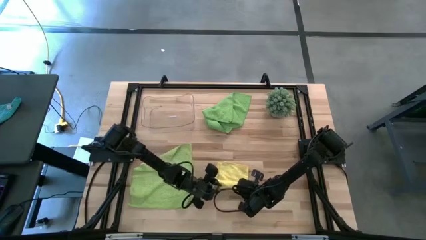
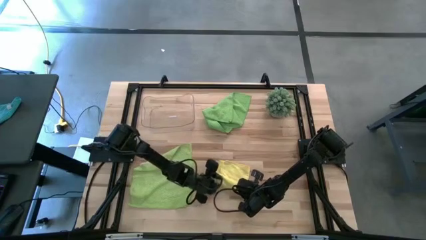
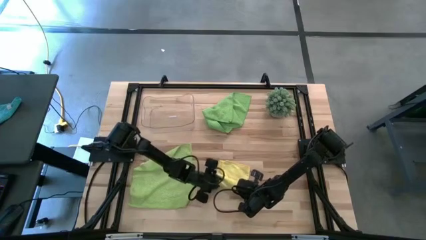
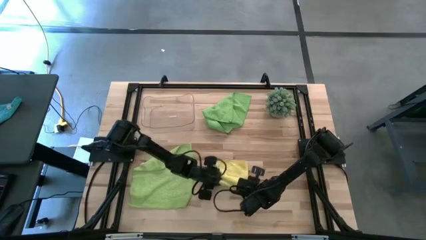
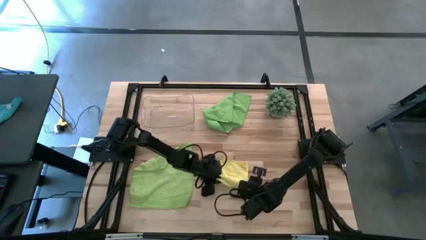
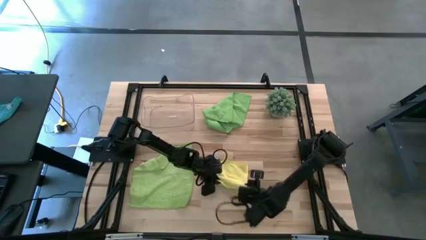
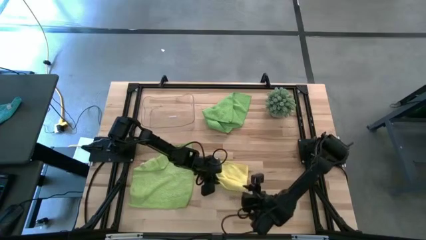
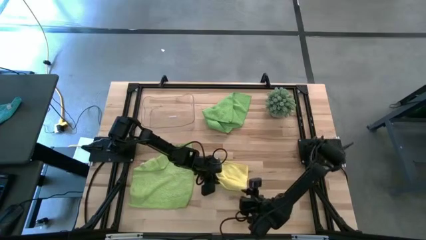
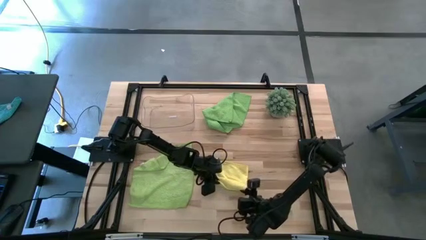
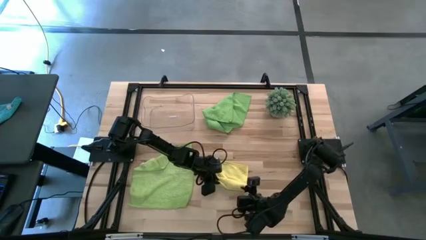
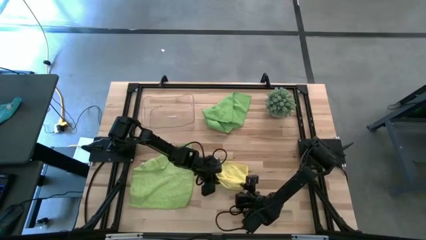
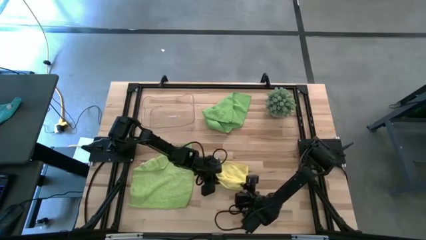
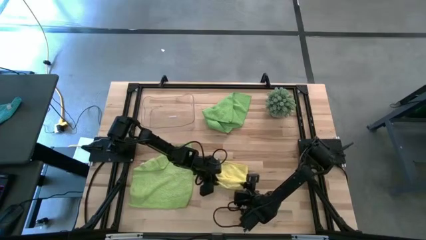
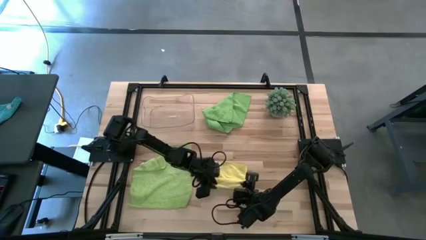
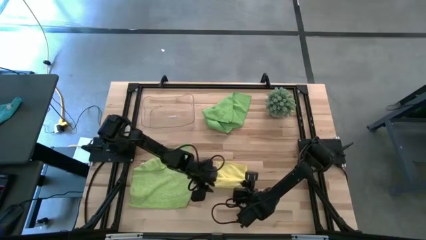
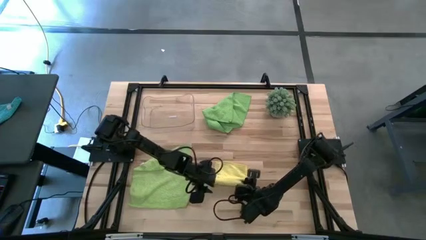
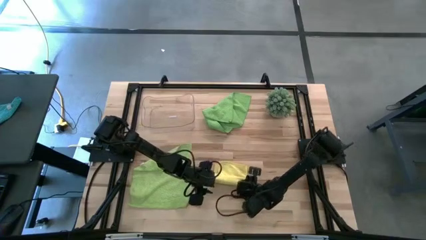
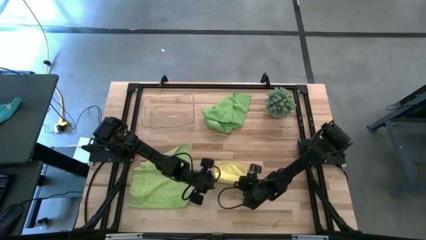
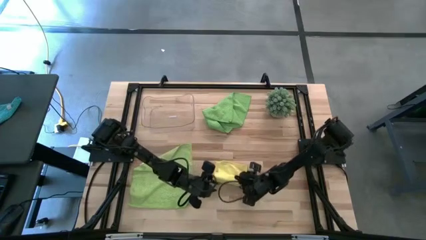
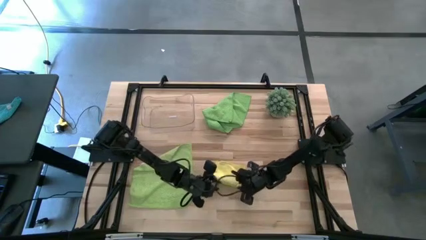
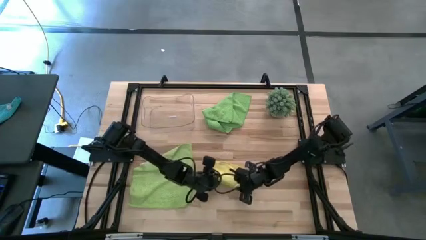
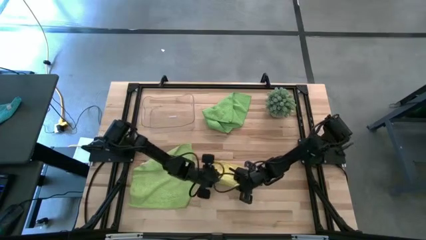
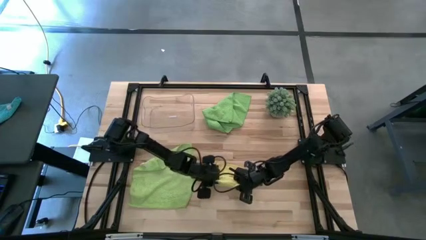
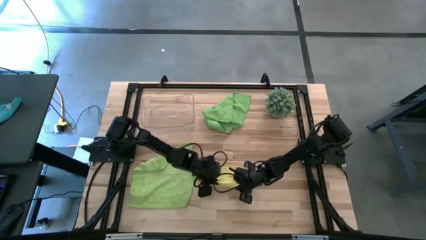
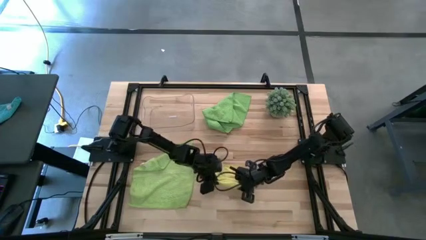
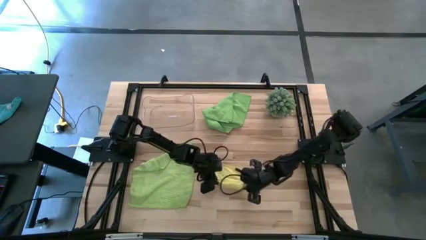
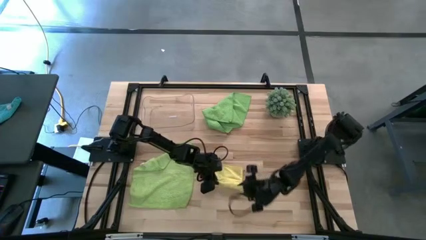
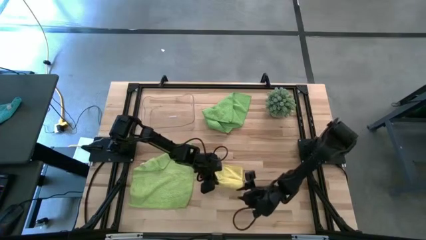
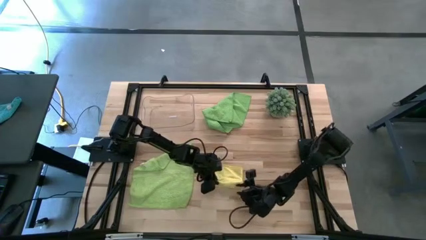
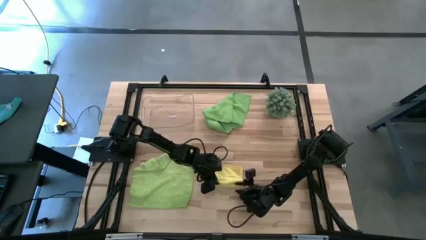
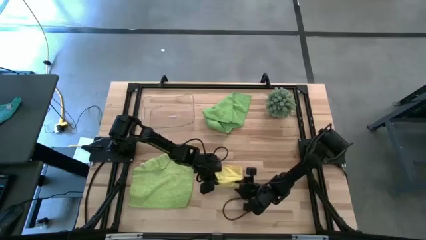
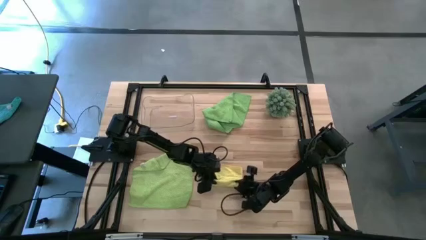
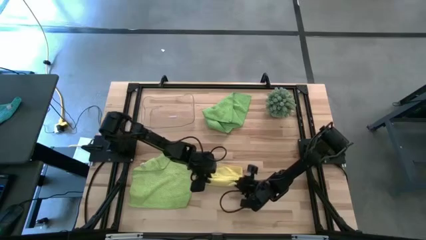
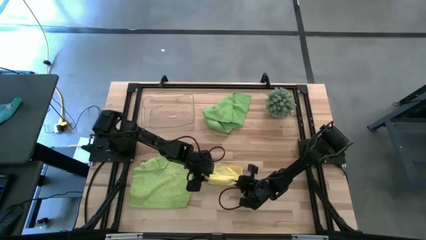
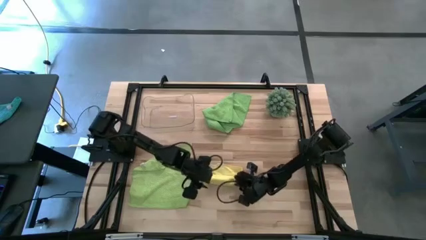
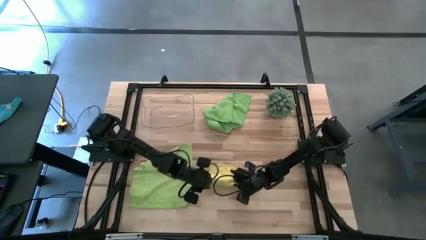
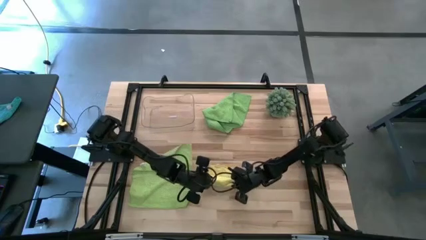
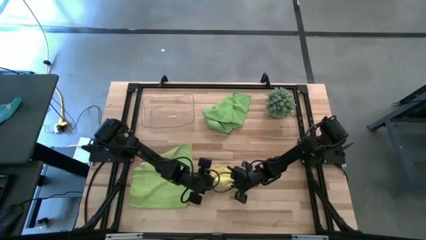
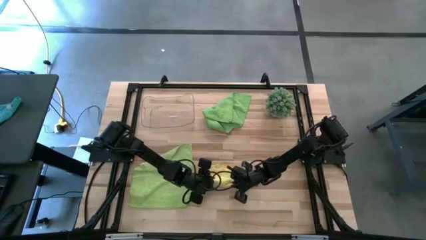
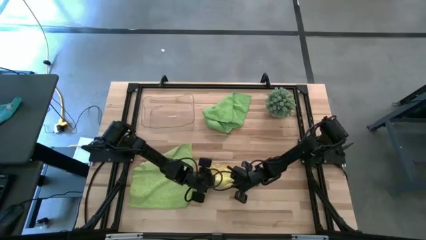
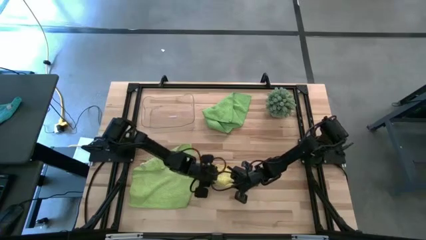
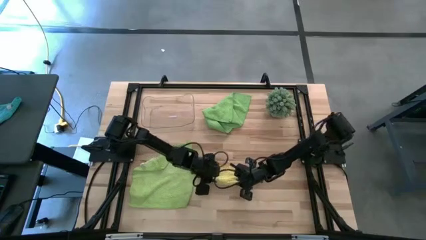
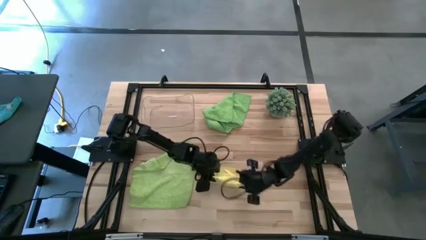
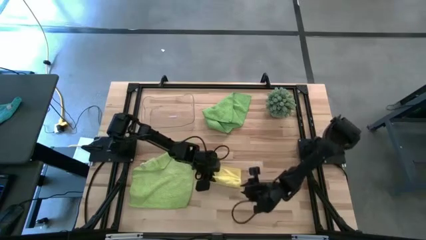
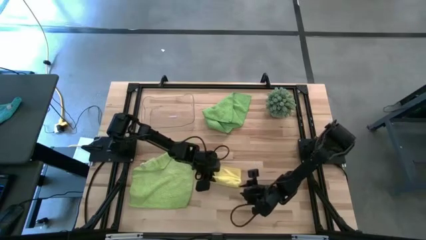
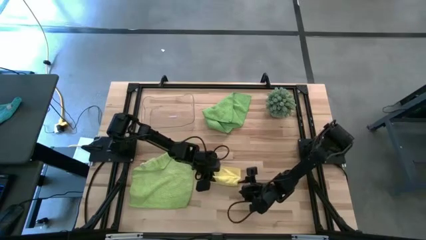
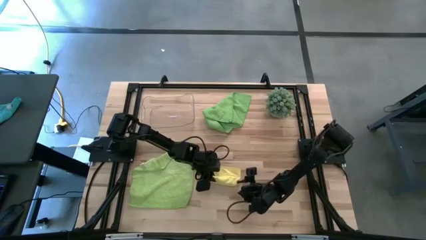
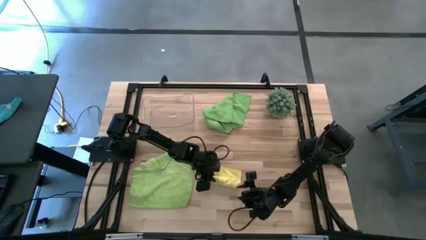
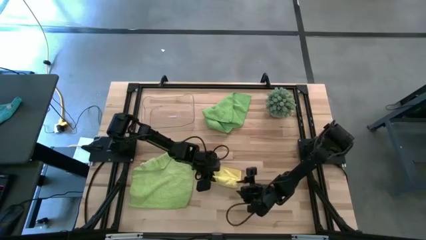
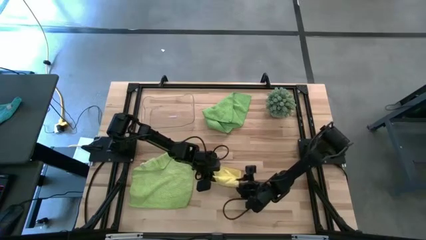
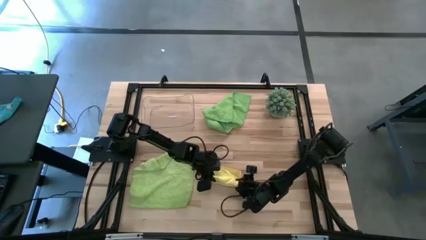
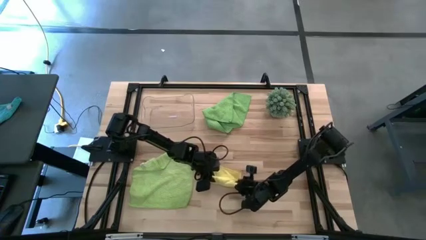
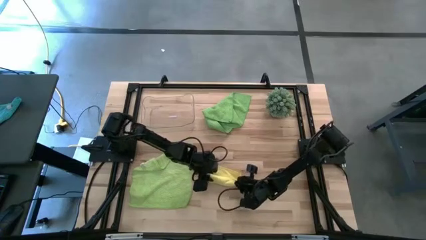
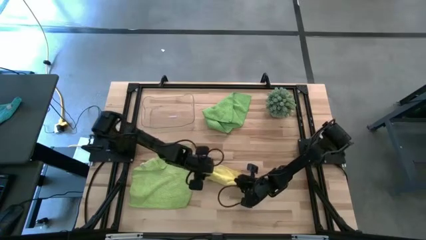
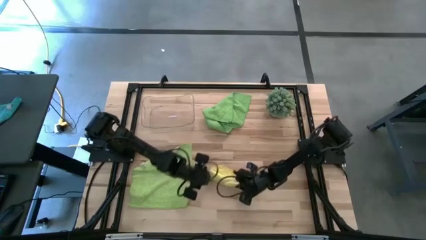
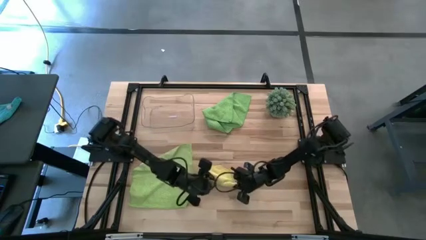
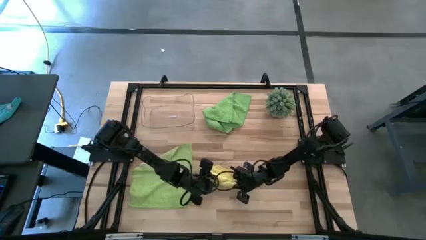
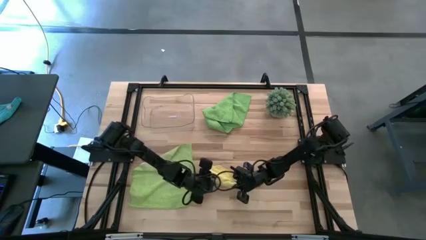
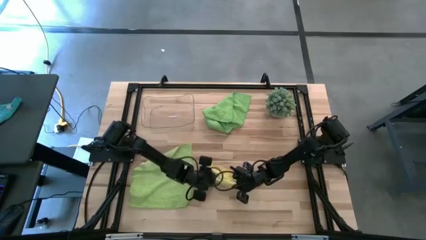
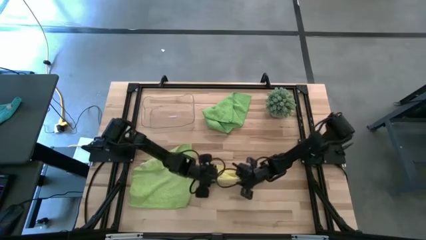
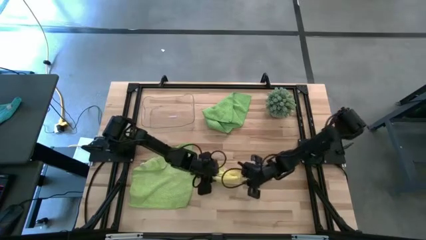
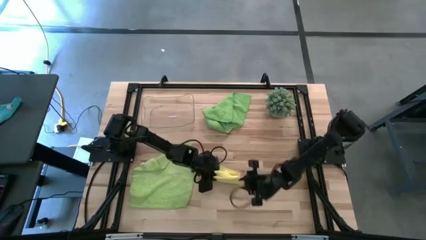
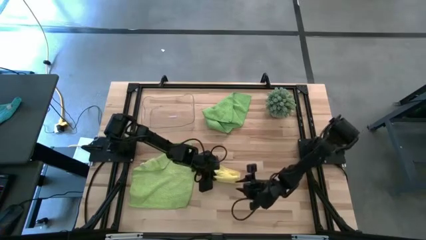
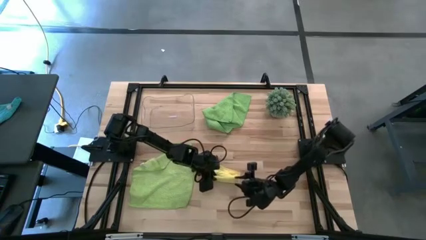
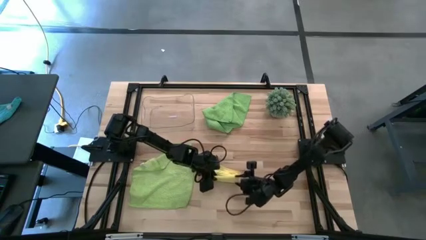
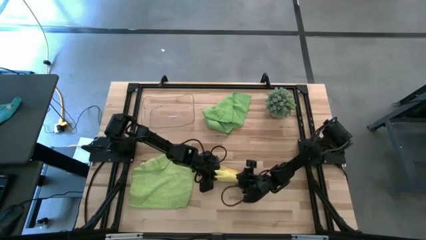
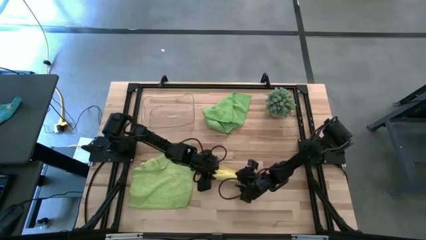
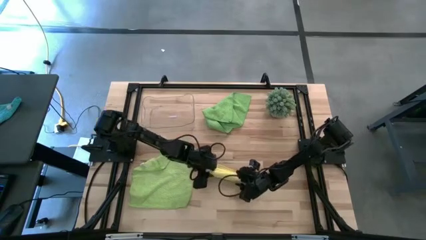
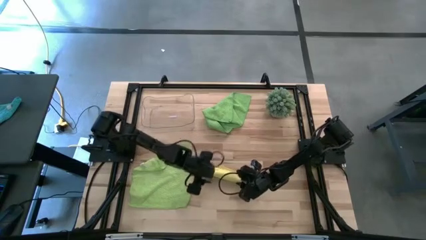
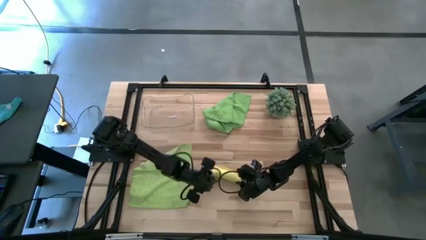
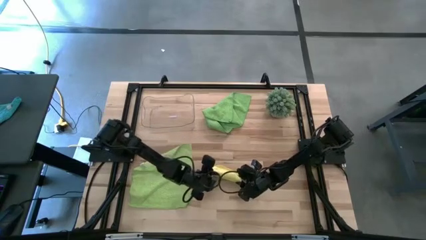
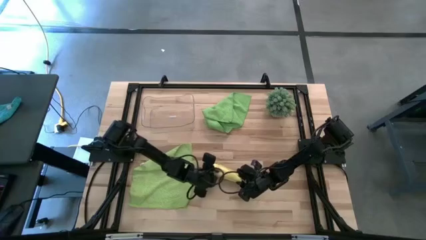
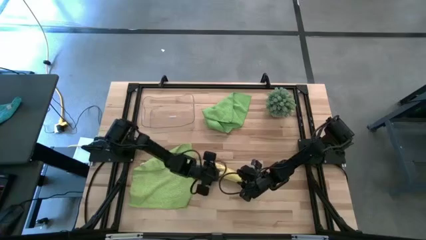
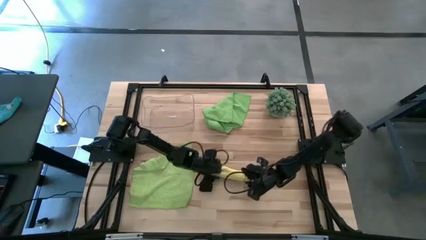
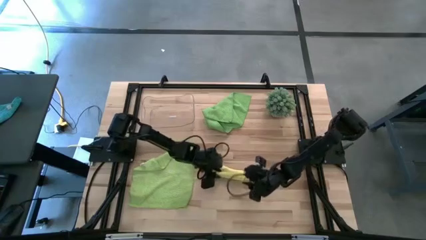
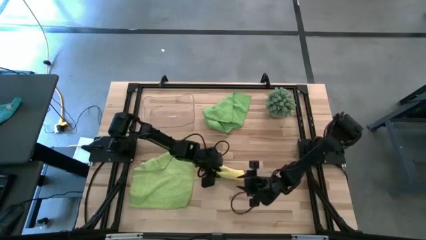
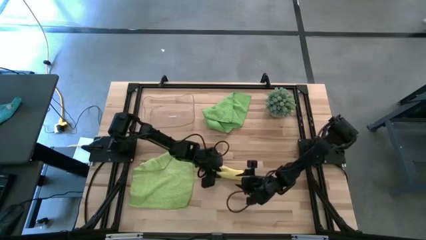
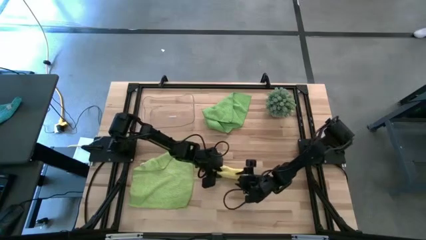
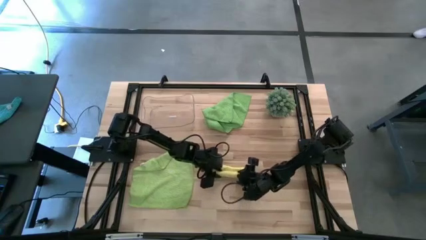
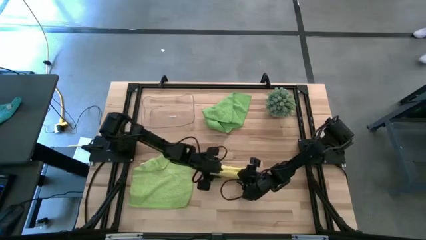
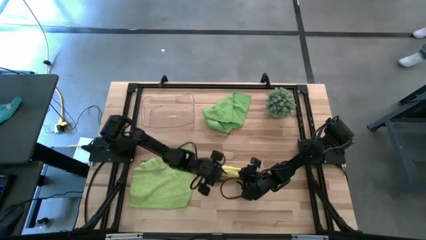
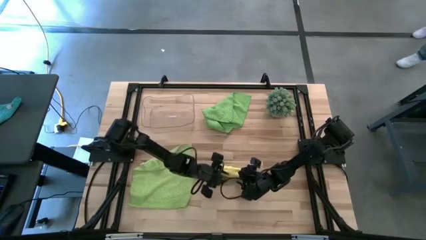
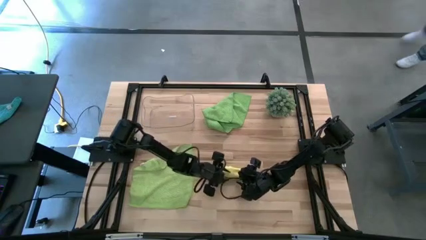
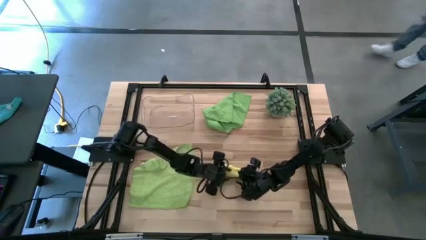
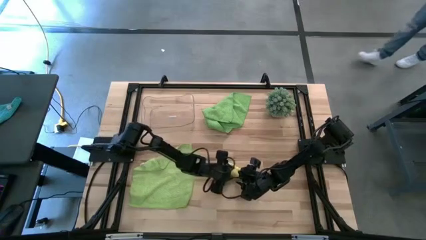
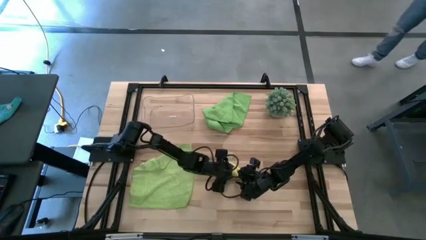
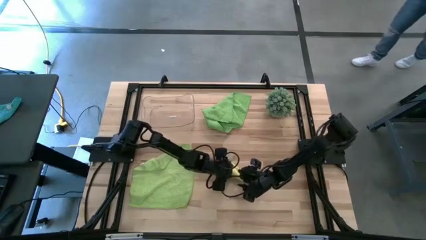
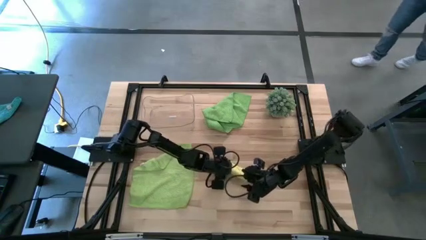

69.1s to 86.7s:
Task: Roll microfiber towels into tight, uniform cylinder then place into a basket
Roll the yellow towel
